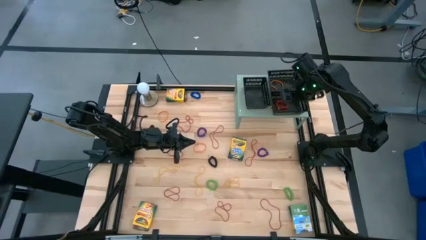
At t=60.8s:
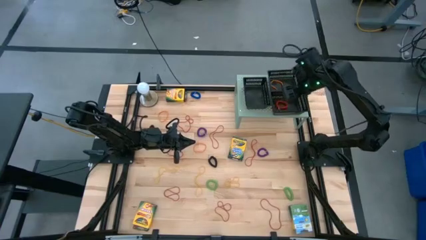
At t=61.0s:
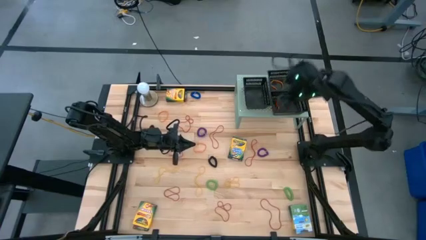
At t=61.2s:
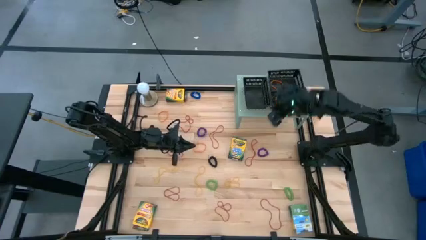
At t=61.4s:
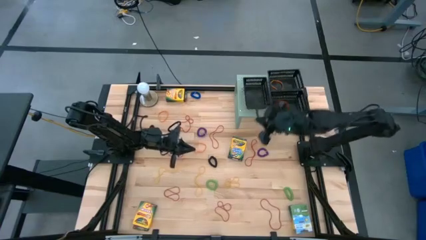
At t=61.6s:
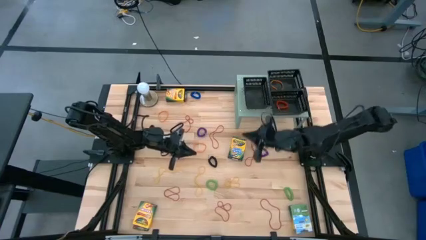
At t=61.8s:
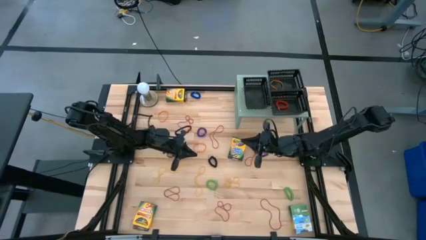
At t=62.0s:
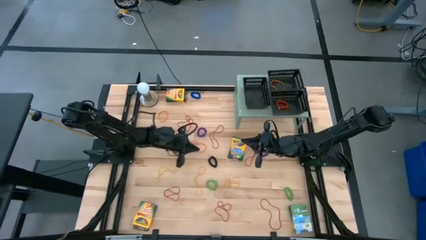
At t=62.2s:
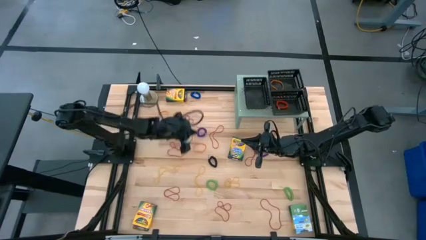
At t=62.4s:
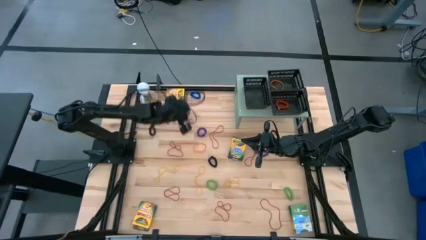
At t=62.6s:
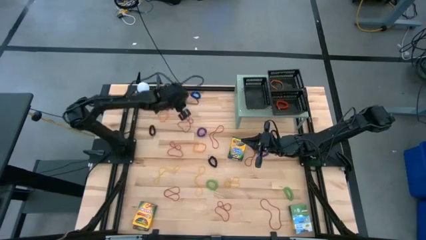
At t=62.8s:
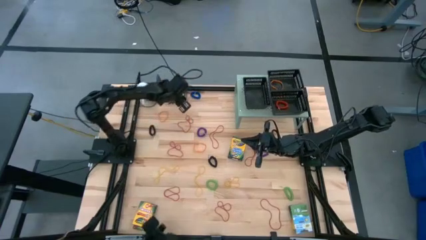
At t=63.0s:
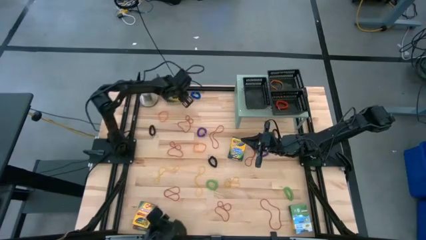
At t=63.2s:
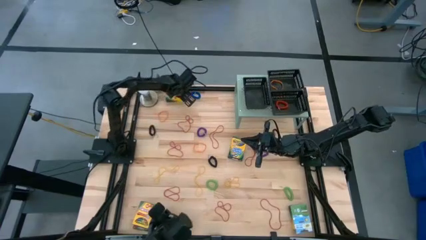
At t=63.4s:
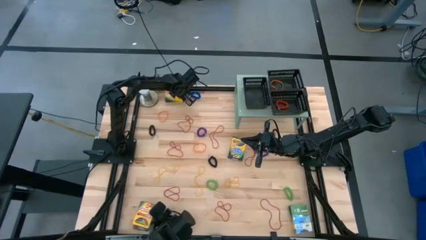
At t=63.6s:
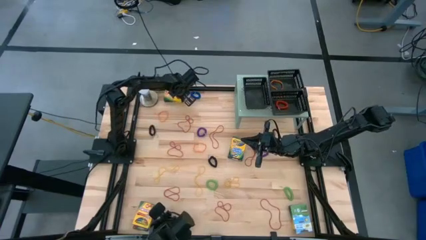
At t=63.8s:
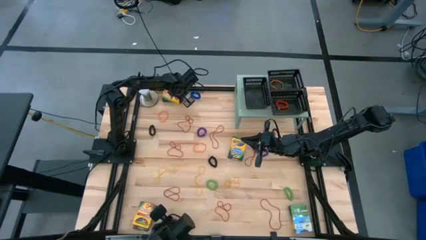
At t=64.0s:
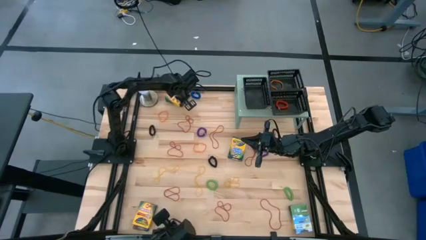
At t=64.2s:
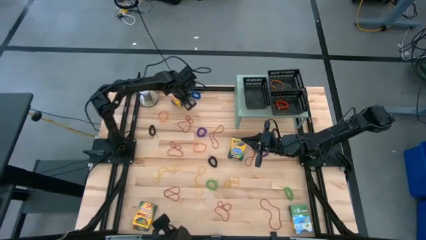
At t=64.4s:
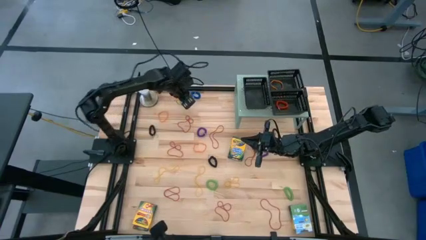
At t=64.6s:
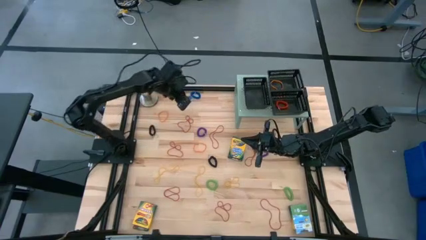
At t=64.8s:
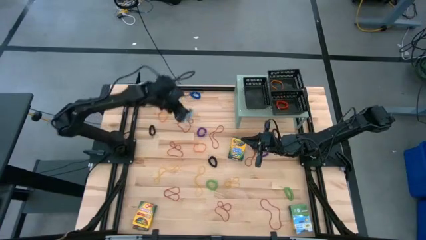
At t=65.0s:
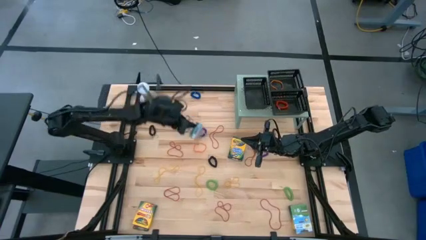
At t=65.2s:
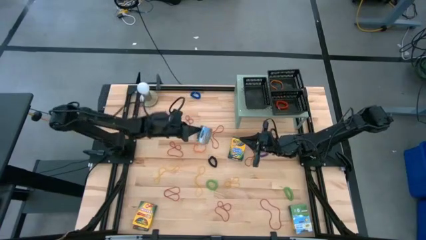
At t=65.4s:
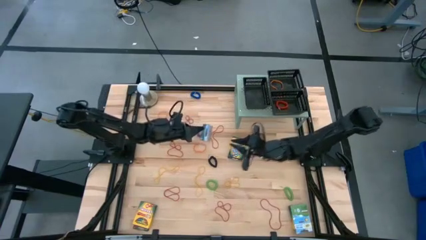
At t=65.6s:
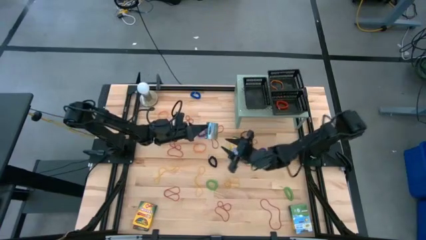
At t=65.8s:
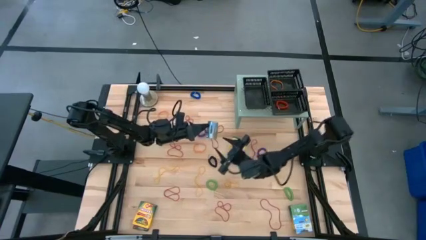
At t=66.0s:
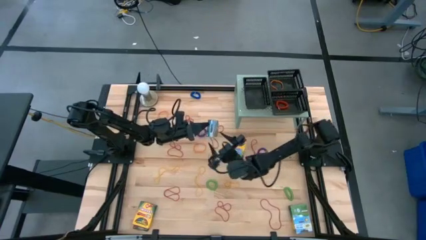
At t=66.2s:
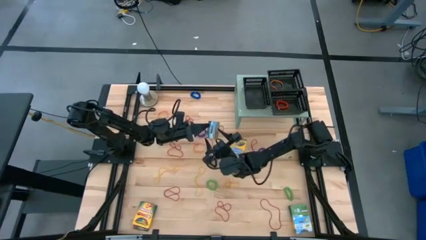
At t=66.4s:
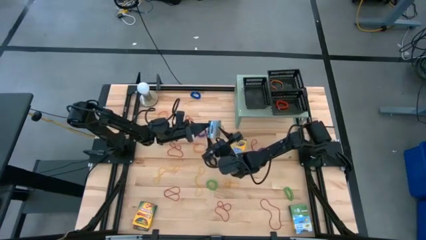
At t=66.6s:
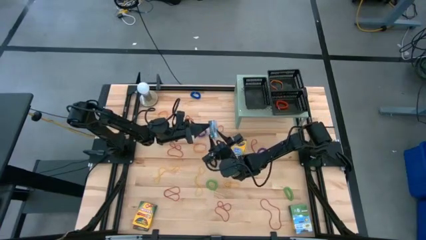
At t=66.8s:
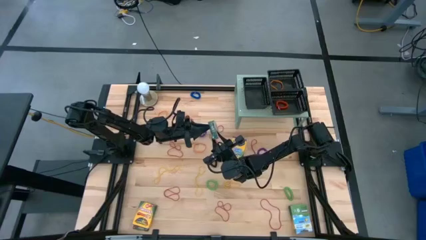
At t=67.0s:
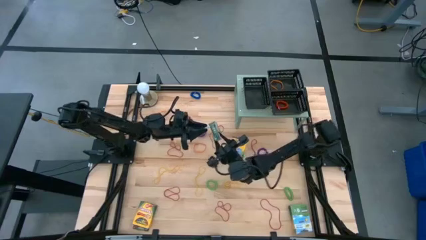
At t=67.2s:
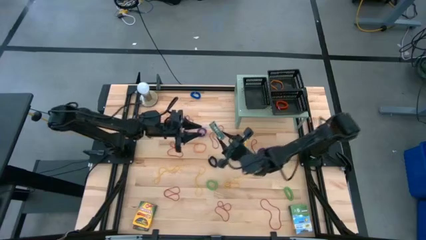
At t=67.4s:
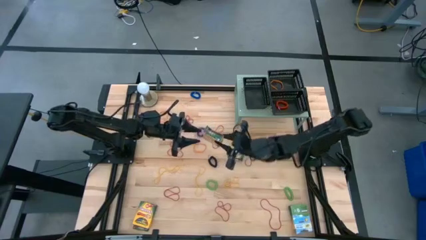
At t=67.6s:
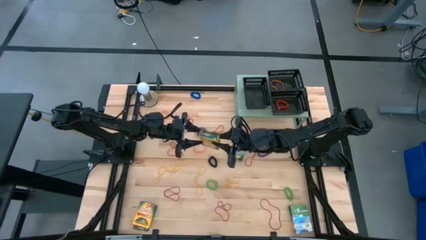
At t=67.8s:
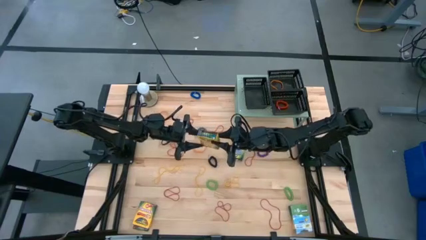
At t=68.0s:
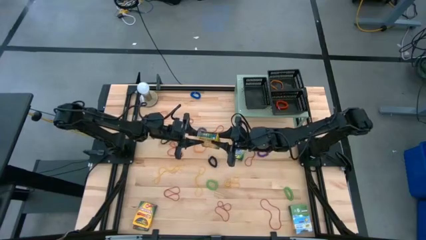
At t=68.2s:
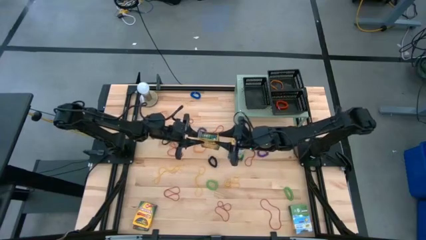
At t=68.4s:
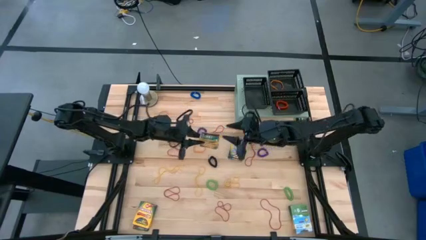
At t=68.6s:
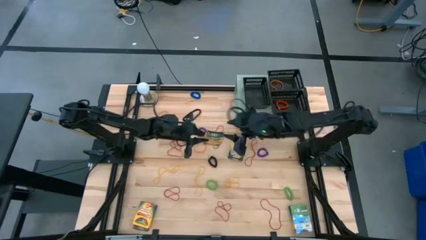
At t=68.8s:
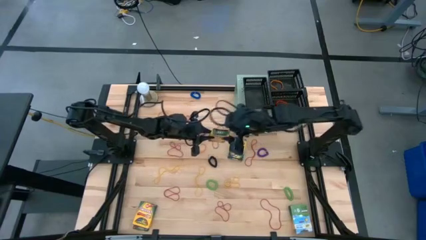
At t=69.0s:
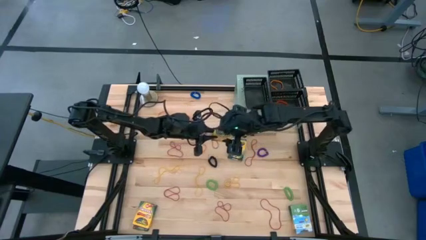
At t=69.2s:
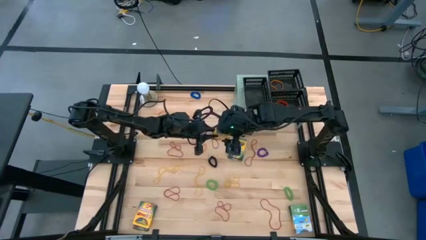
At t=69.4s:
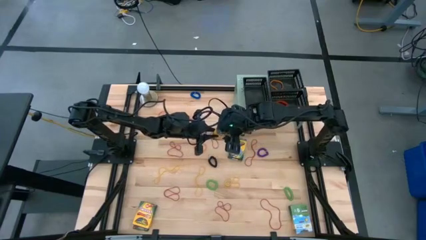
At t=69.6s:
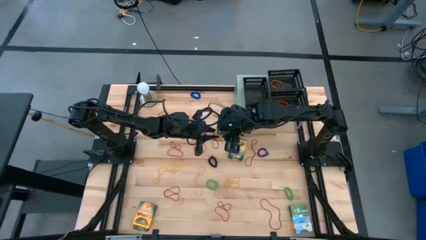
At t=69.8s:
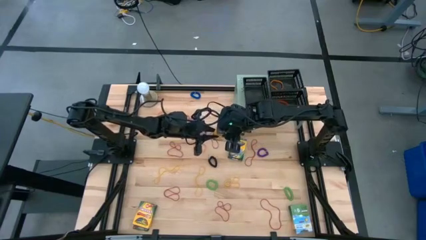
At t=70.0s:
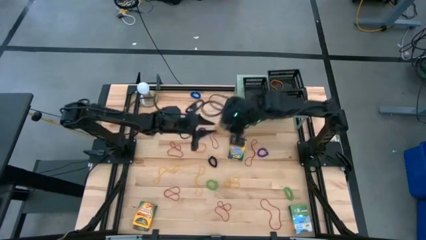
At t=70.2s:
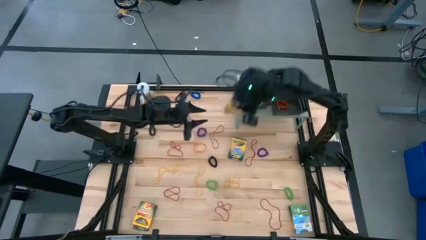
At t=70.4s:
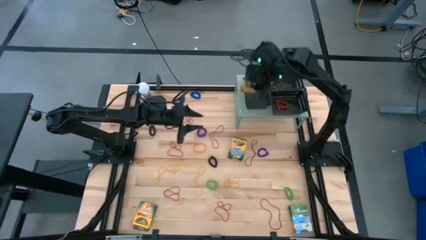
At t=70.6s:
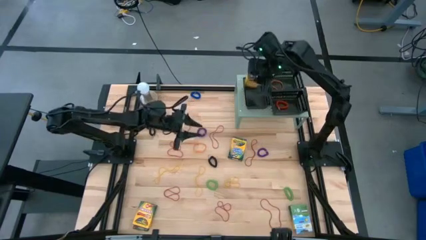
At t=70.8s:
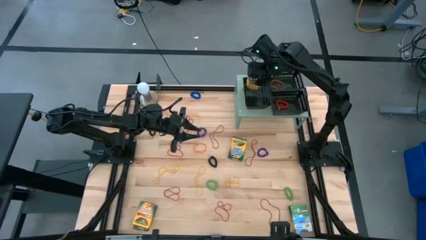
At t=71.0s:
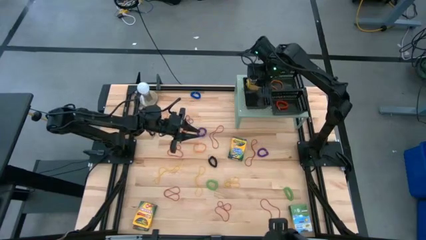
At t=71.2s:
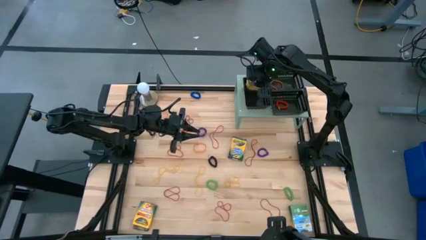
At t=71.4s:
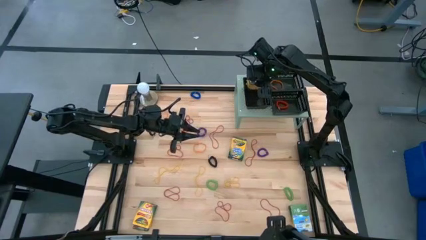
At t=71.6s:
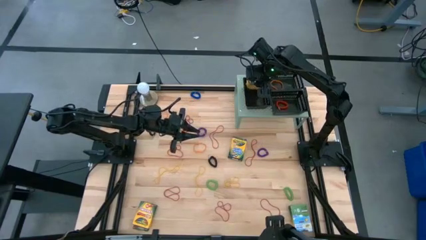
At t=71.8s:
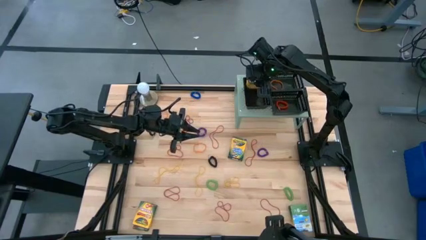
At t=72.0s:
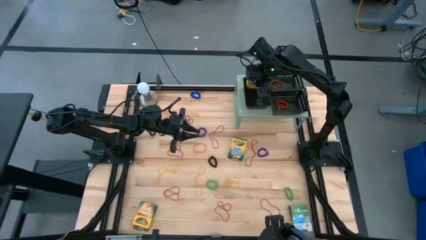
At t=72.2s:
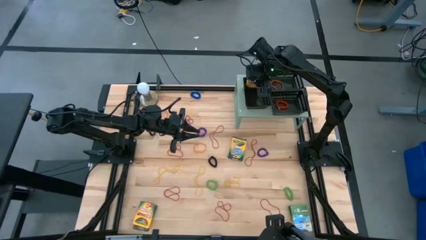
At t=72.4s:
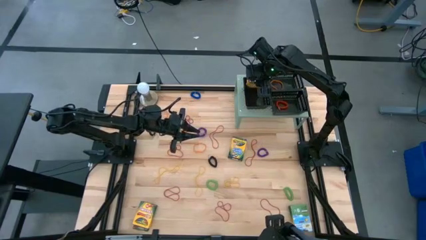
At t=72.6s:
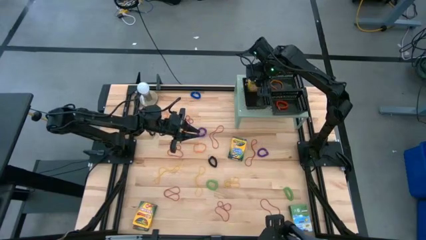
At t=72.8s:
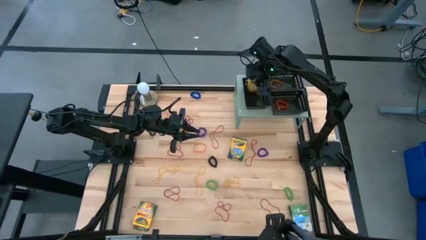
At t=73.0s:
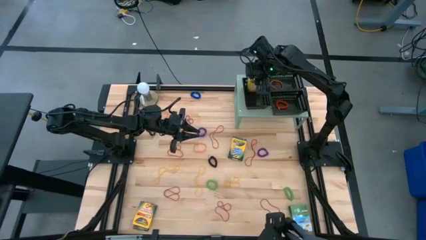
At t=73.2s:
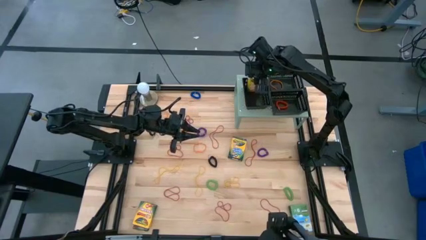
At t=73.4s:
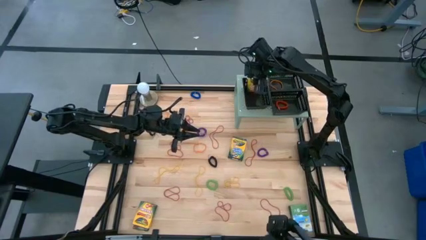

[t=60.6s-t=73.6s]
Task: Pick & Place Office Desk Supplies
Put the top left yellow crayon box into the left black bin on the shelf

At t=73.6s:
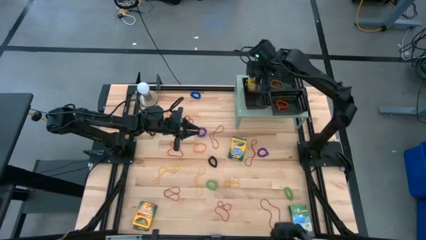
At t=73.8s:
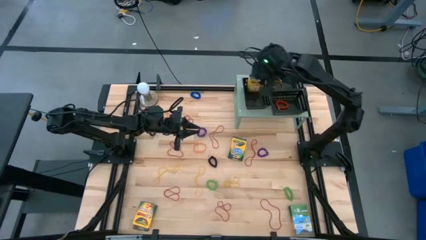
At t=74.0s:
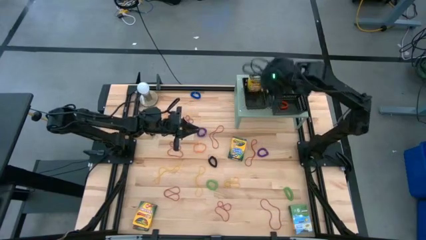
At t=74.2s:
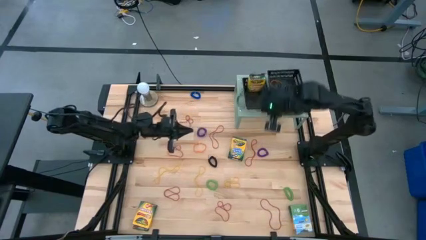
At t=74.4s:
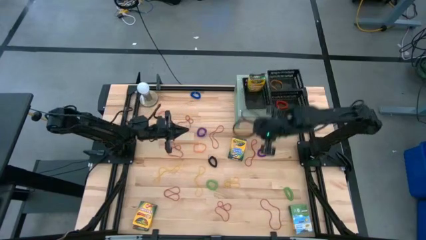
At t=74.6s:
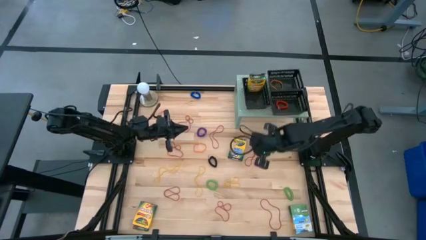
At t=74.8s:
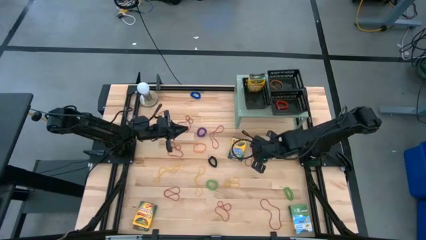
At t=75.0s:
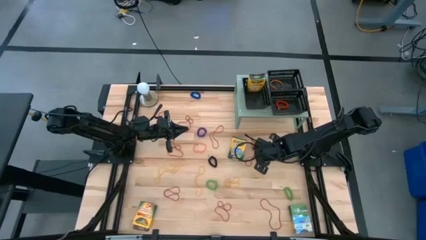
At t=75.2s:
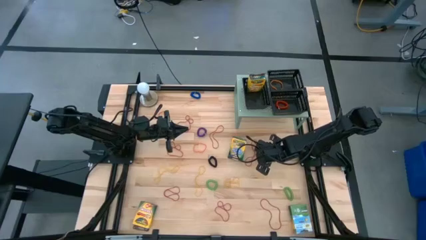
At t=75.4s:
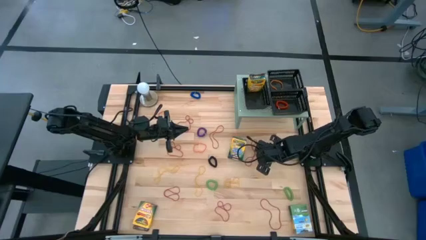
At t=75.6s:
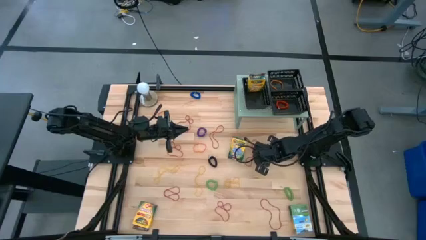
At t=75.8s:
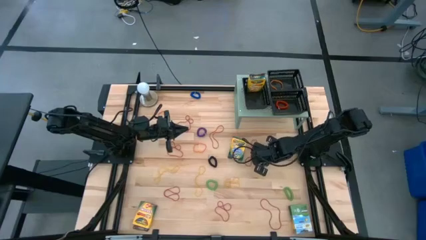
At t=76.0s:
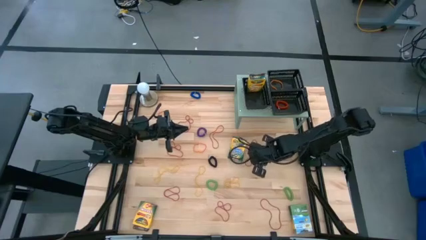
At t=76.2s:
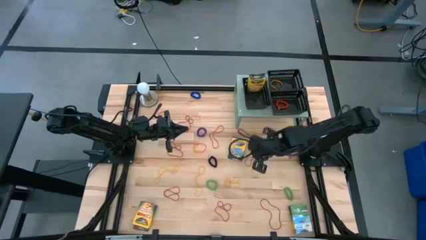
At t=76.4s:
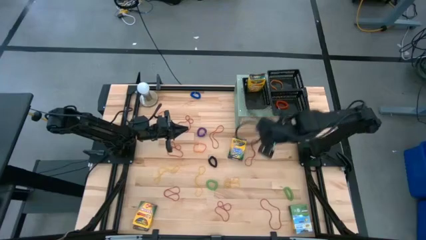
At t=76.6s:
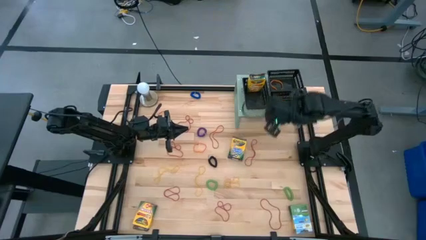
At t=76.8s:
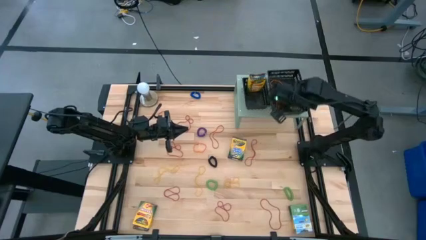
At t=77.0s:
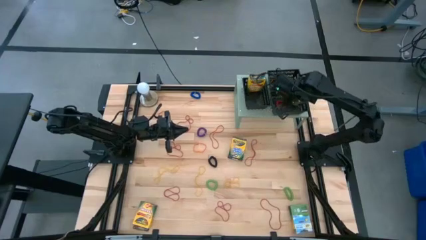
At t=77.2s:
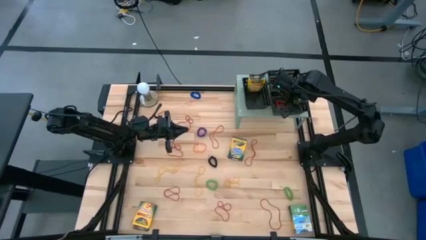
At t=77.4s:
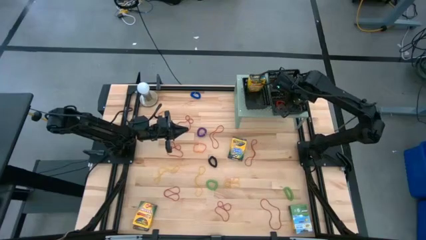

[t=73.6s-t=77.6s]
Put the right violet spring keychain into the bottom right black bin
